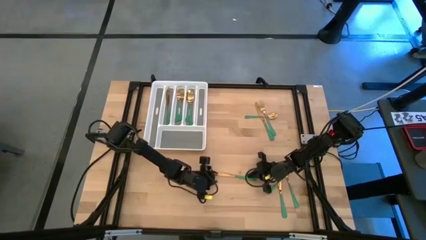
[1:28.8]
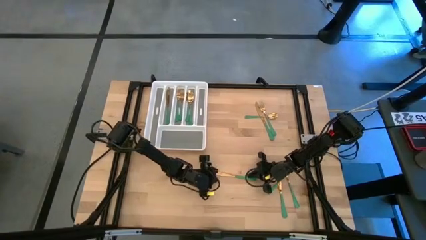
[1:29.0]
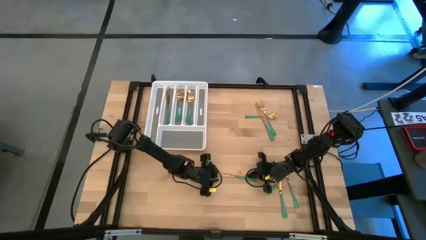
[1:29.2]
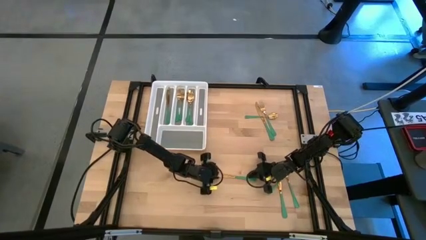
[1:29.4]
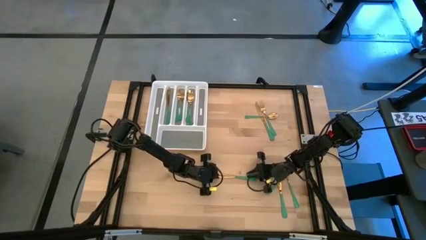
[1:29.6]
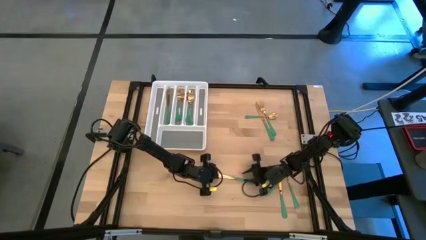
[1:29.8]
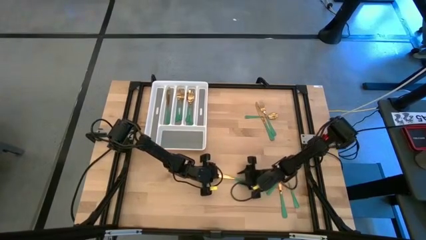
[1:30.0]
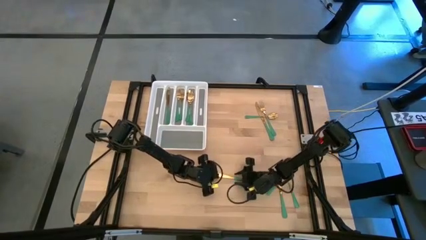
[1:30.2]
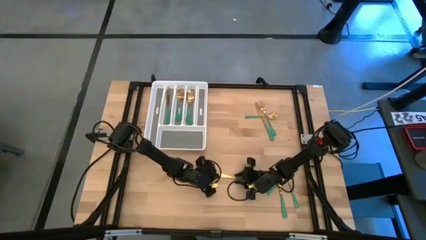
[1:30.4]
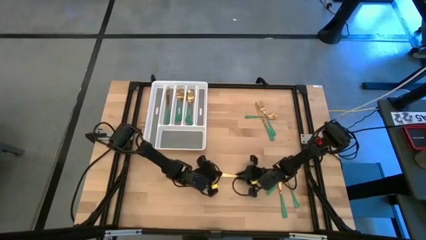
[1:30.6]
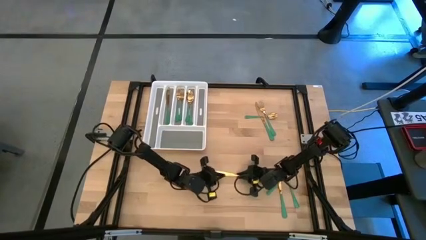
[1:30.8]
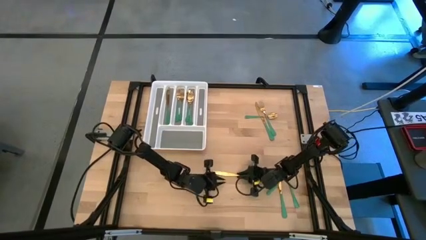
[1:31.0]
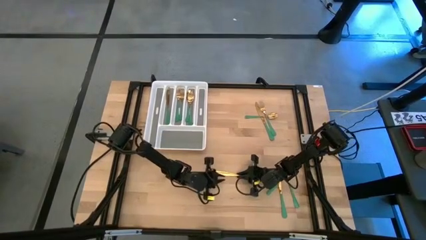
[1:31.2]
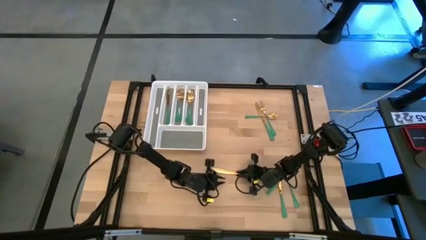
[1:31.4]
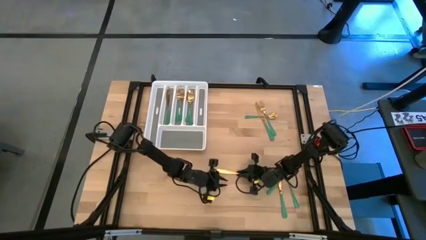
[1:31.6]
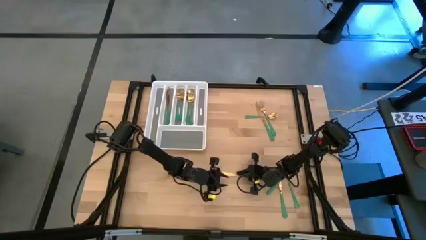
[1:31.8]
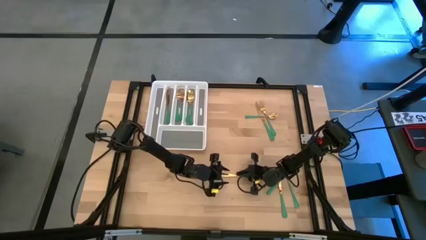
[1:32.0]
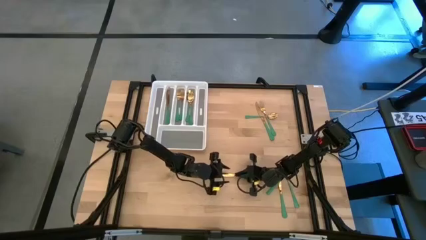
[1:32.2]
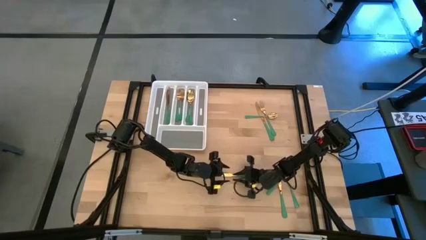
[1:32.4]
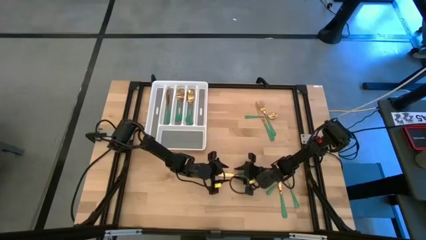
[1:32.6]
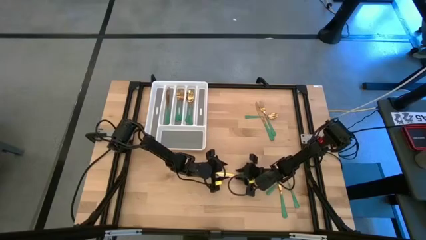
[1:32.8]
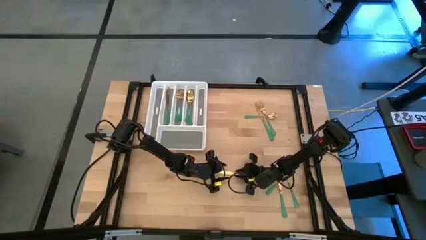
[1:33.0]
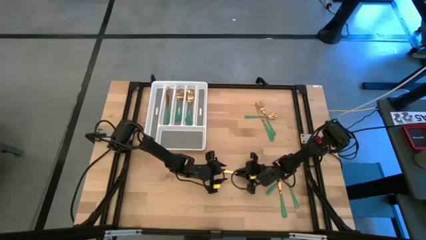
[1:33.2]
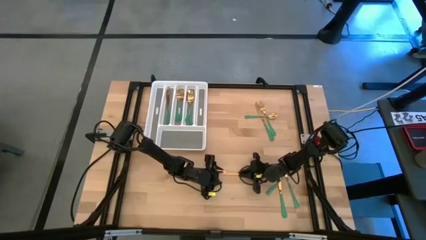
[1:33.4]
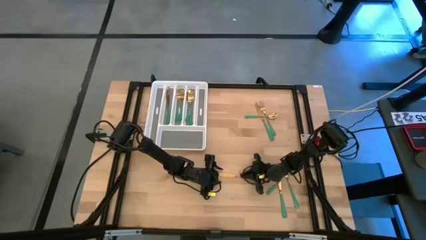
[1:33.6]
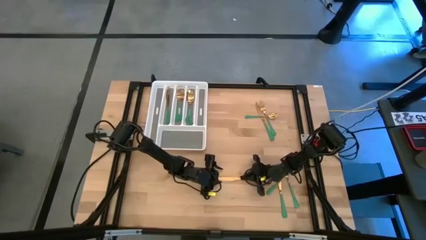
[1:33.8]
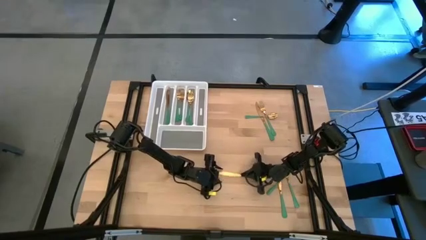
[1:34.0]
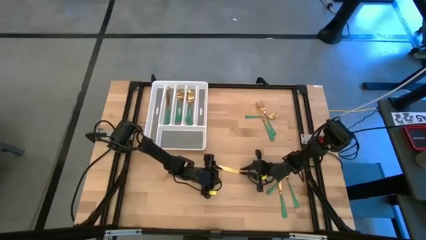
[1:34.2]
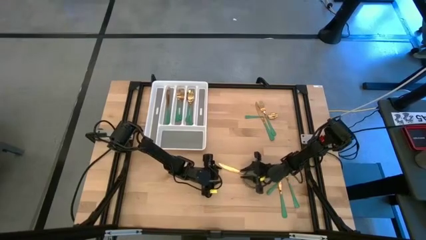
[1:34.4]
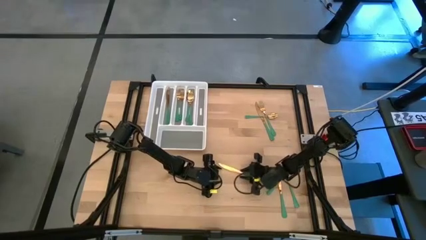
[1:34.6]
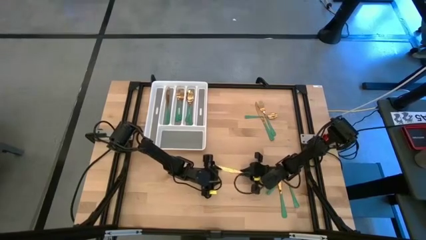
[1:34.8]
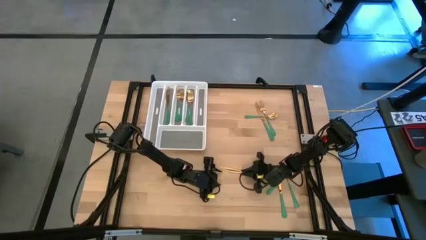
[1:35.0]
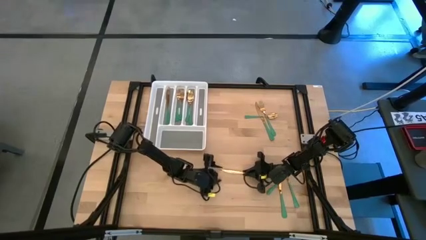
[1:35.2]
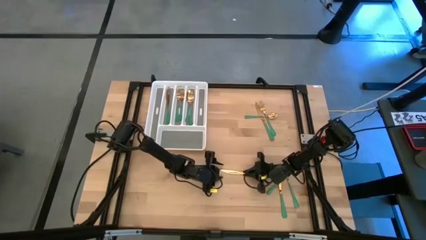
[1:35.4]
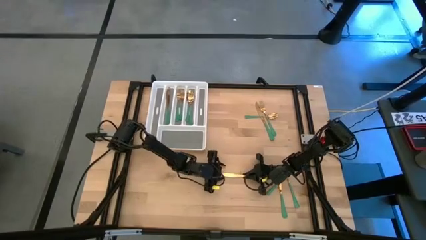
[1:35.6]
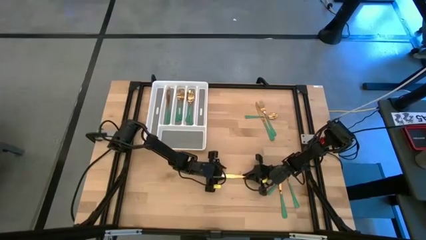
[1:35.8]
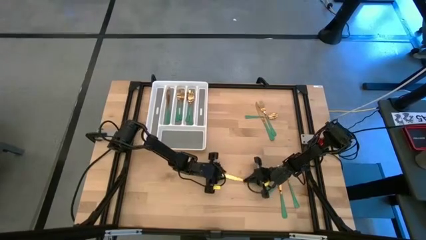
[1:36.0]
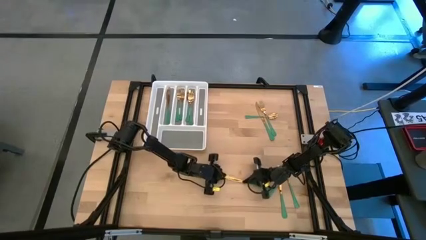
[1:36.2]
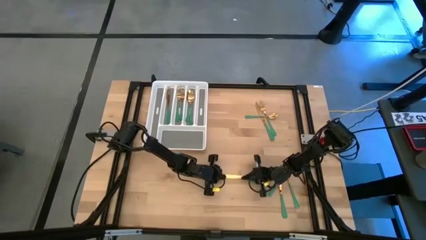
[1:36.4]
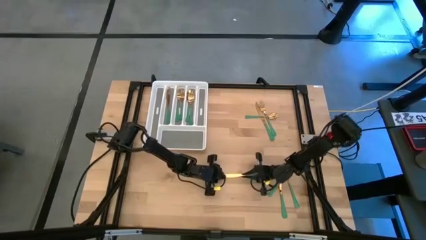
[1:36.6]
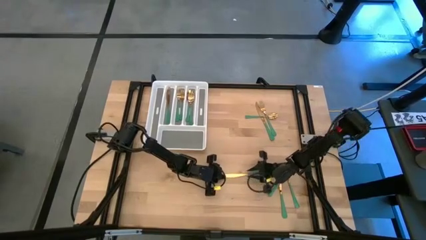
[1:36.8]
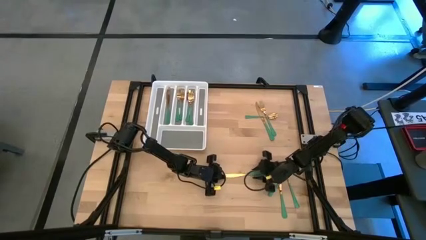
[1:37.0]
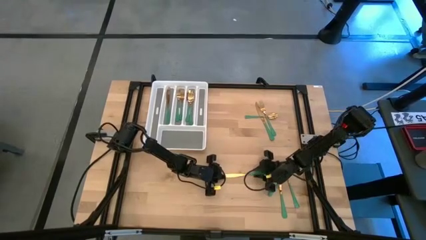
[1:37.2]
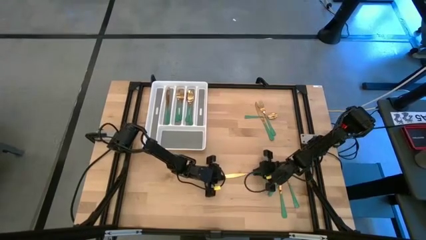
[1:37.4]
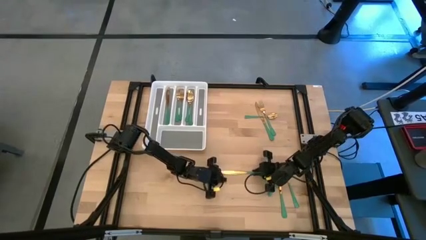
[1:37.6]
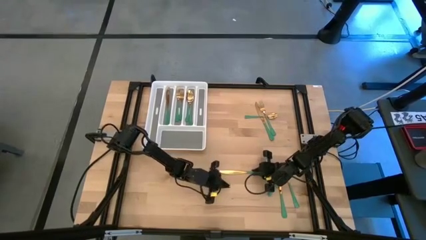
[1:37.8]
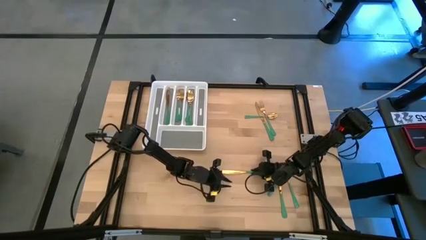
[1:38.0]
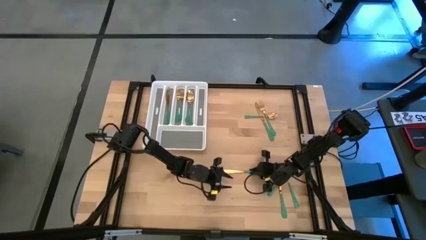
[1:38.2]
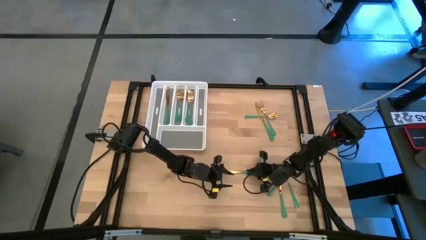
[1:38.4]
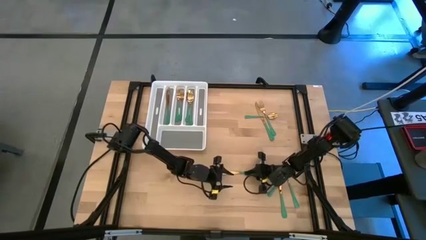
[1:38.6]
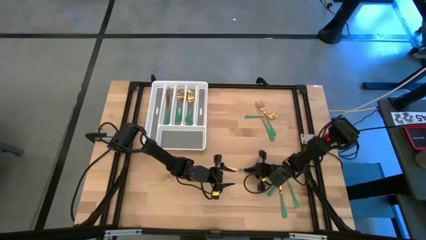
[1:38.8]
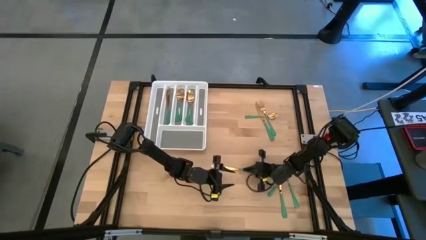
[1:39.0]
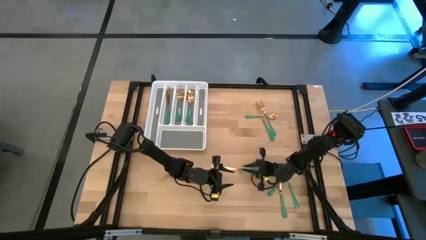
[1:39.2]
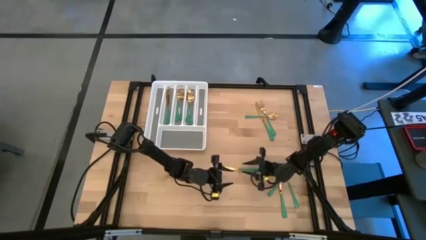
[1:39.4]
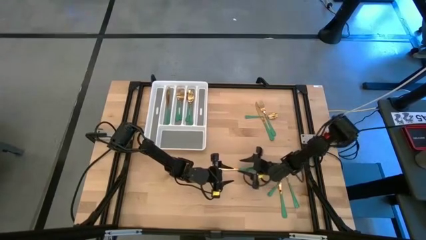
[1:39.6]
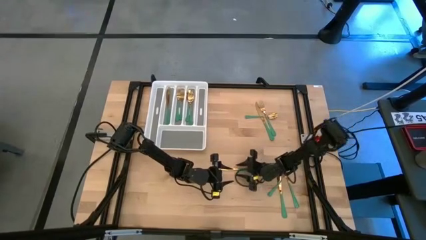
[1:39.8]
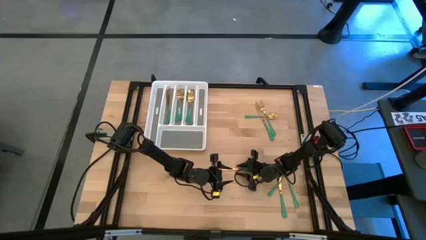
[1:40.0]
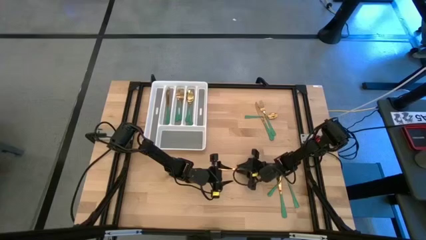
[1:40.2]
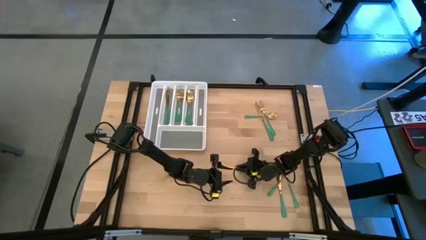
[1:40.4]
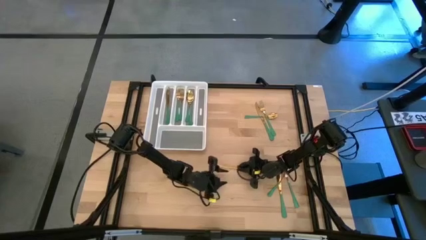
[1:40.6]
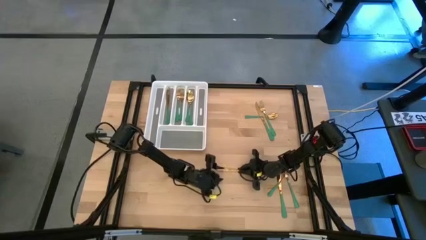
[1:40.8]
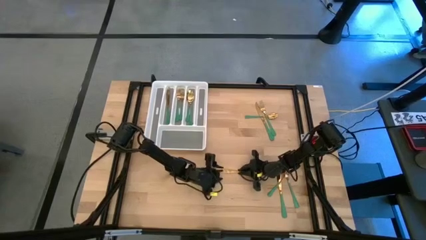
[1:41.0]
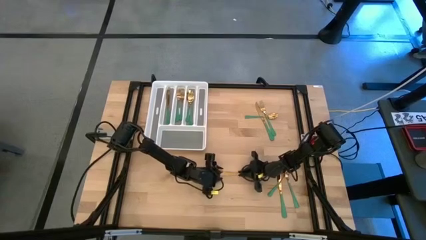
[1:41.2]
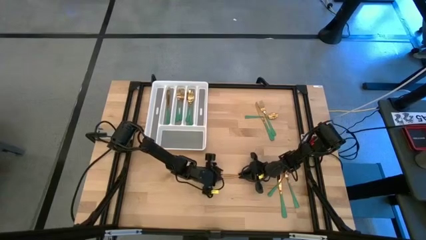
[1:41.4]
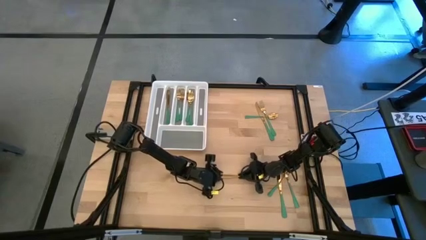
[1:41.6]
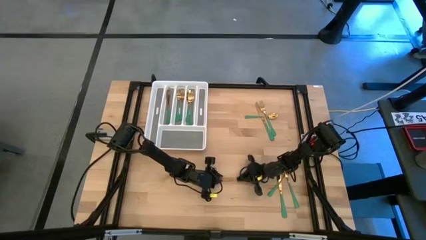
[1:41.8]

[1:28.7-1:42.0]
Task: Sort silverware
Put the green knife into the white cutlery tray

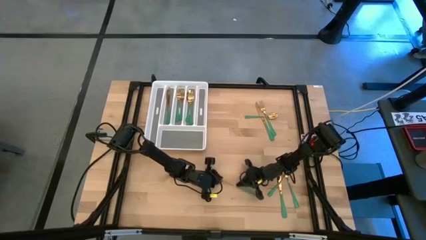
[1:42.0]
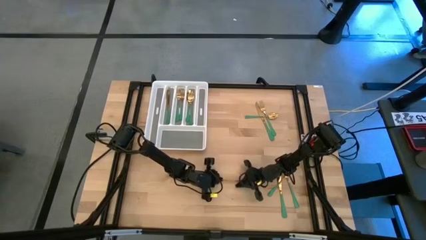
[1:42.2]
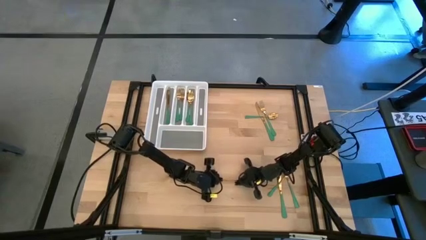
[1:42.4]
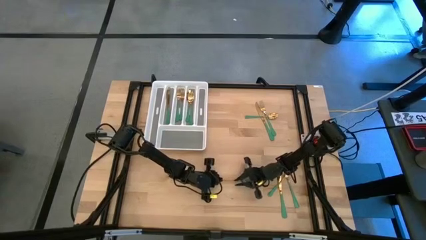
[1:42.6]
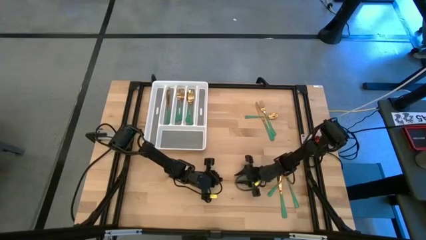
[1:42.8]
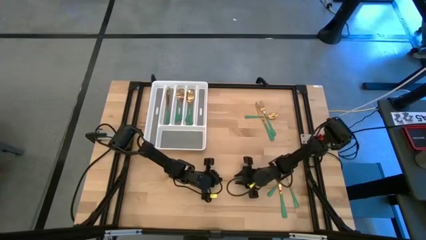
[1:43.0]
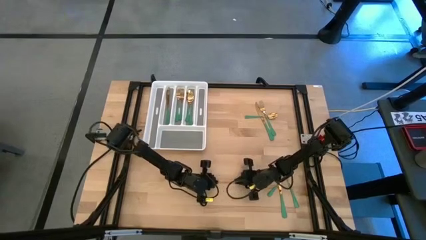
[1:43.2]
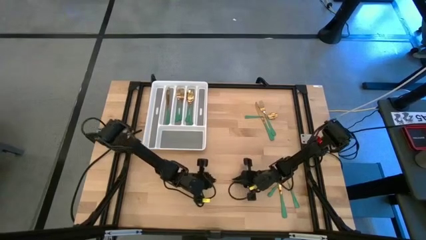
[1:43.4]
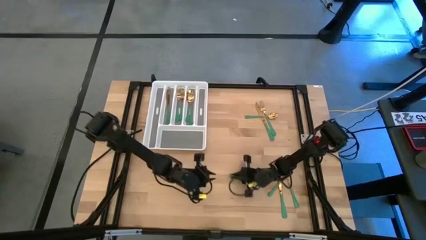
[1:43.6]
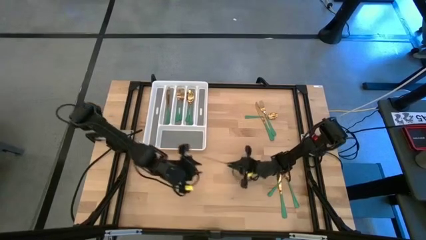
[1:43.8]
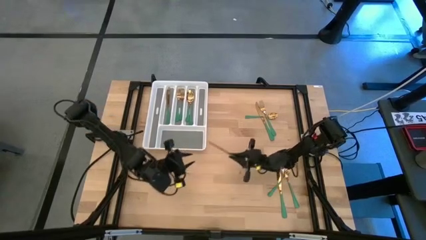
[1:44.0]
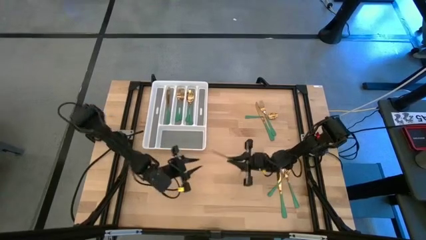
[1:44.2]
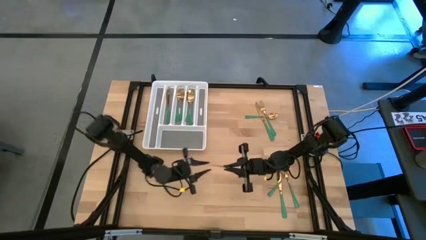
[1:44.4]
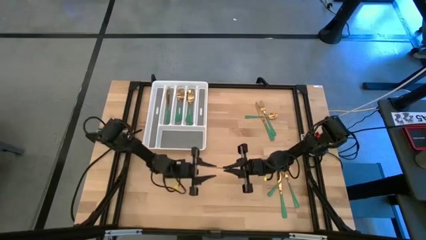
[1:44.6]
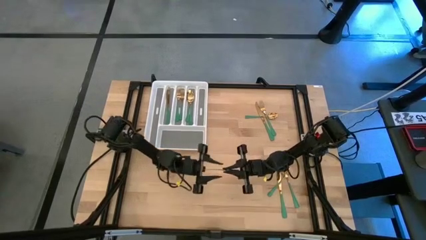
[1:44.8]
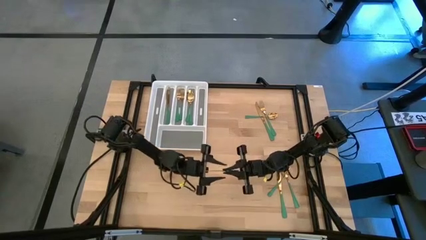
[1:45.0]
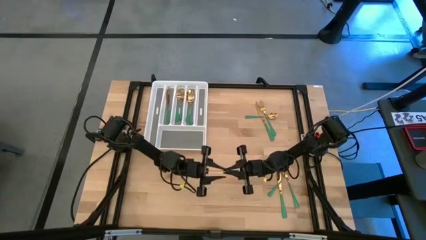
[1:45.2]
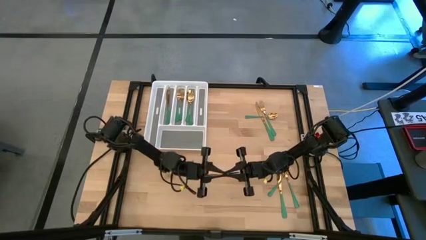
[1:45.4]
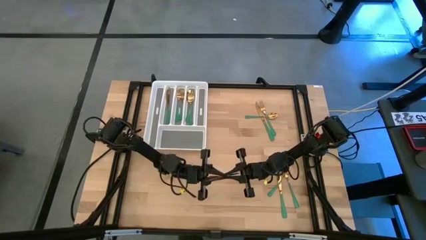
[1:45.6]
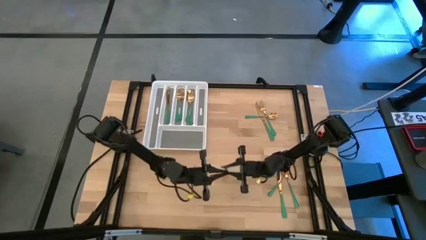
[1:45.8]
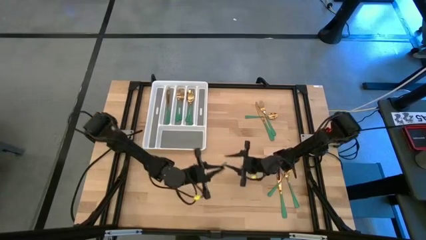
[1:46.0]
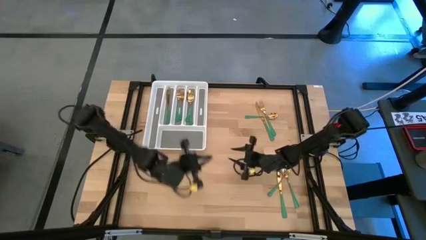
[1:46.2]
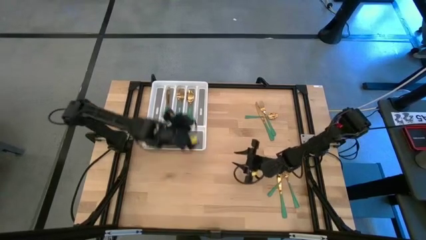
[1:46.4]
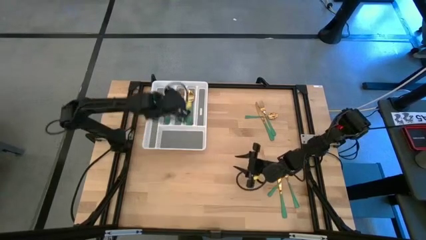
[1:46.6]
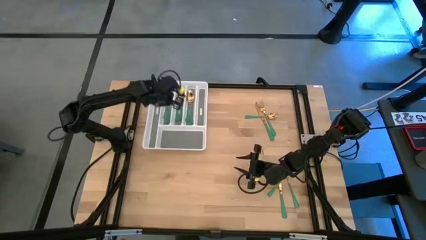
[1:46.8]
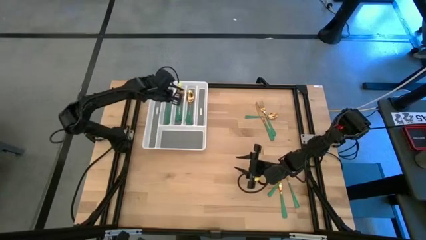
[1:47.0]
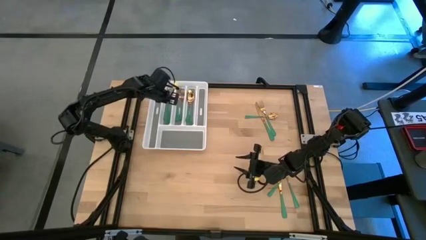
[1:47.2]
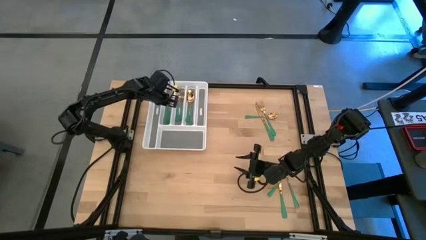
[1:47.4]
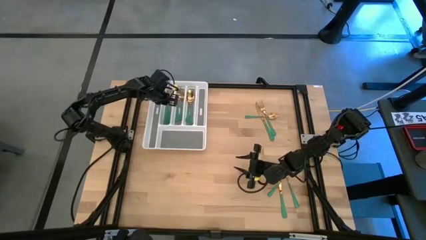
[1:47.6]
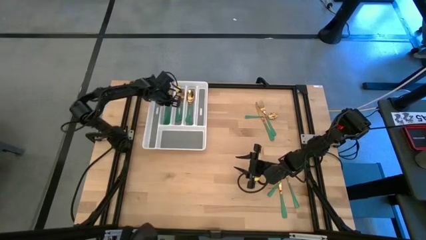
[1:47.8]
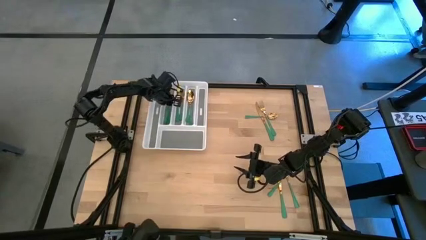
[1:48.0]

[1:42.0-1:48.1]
Put the green knife into the white cutlery tray
